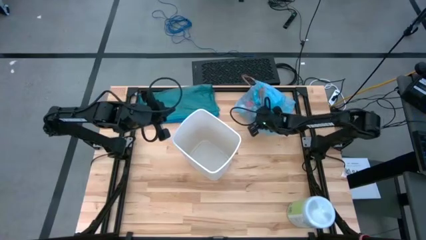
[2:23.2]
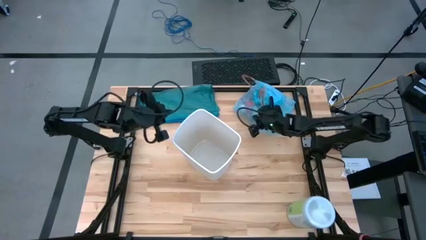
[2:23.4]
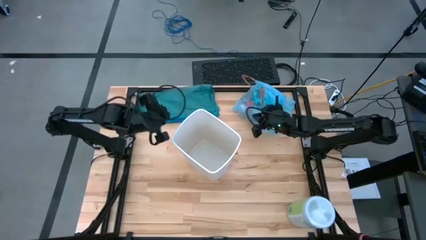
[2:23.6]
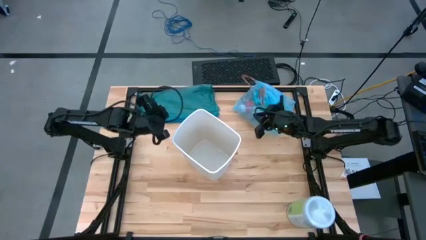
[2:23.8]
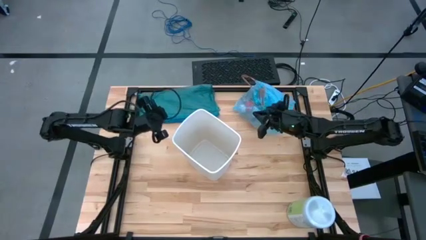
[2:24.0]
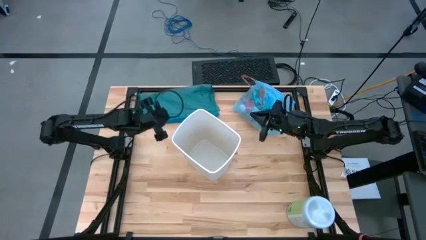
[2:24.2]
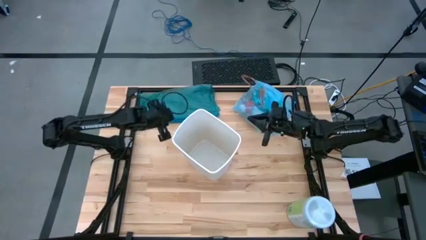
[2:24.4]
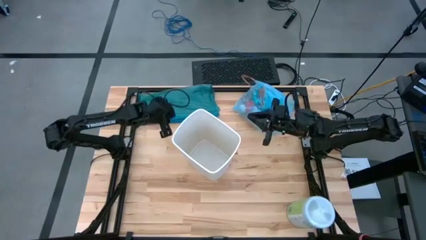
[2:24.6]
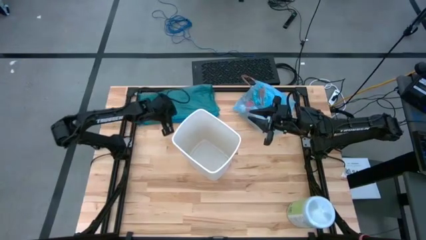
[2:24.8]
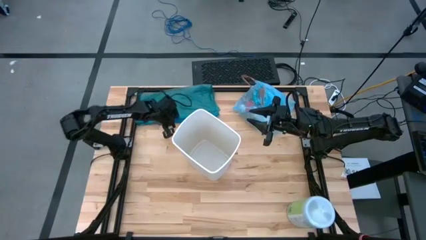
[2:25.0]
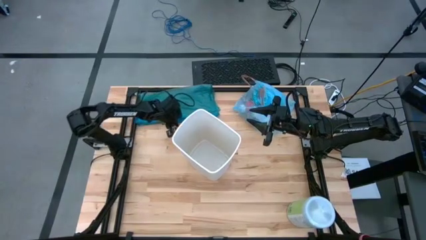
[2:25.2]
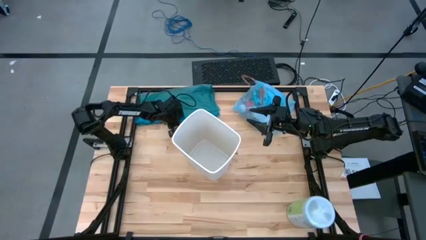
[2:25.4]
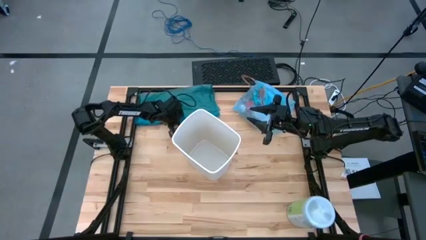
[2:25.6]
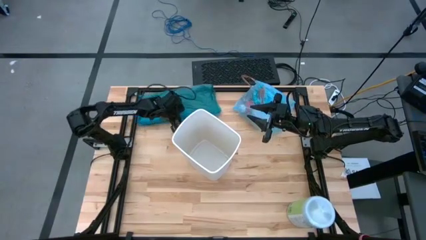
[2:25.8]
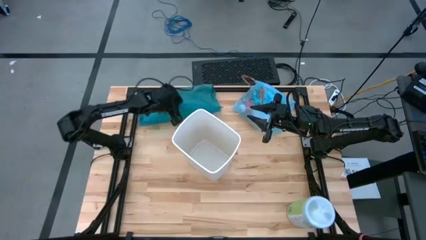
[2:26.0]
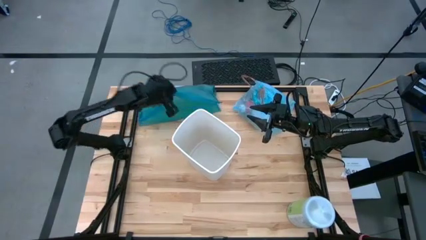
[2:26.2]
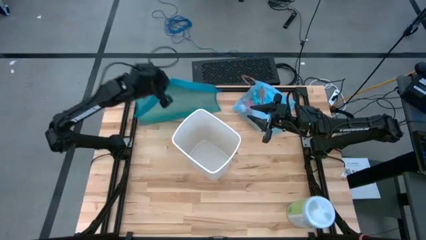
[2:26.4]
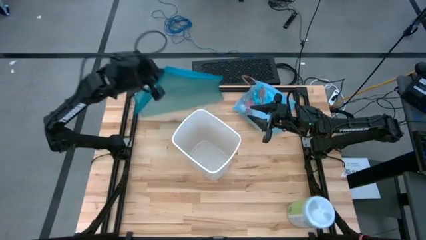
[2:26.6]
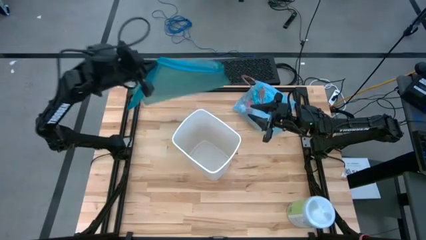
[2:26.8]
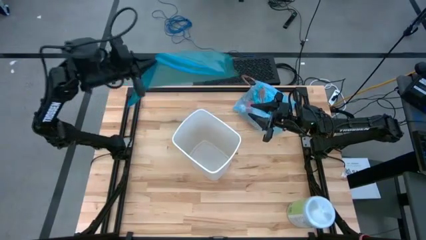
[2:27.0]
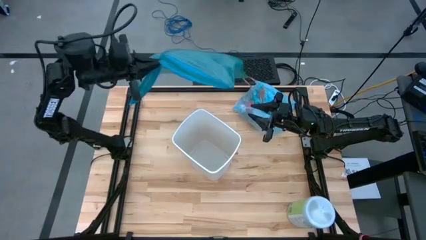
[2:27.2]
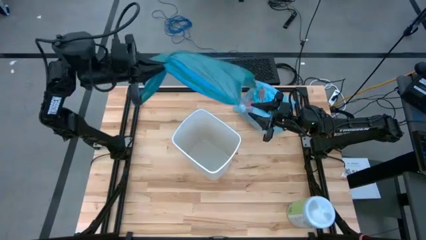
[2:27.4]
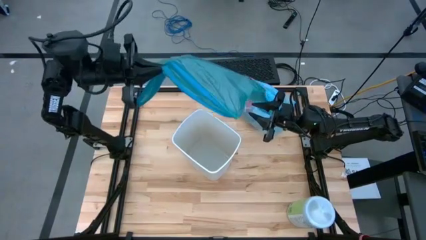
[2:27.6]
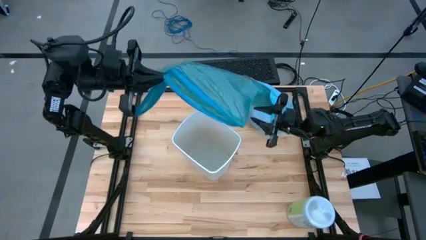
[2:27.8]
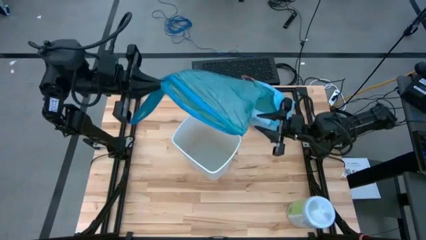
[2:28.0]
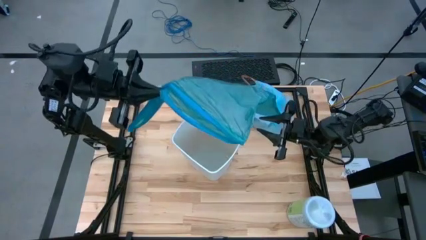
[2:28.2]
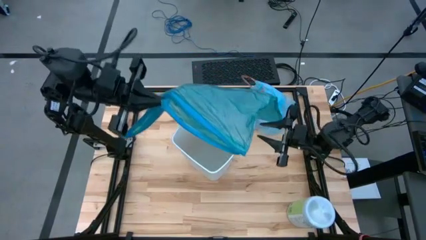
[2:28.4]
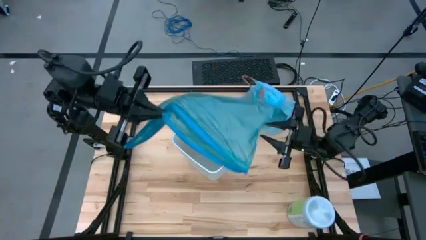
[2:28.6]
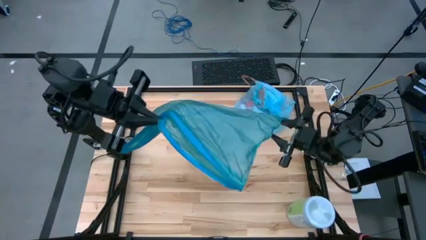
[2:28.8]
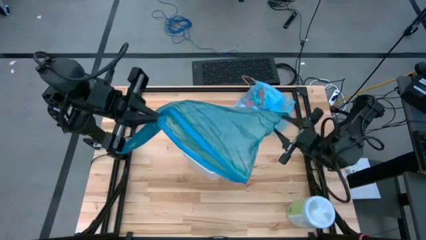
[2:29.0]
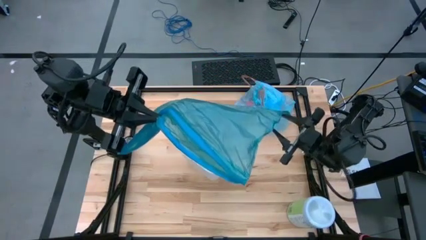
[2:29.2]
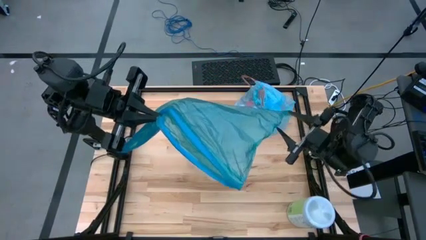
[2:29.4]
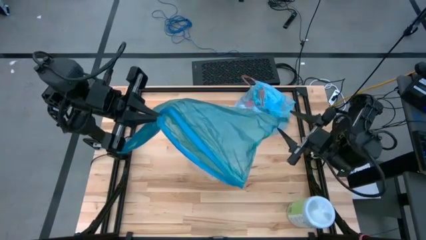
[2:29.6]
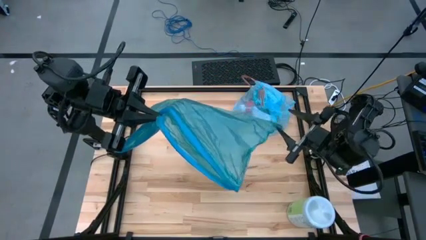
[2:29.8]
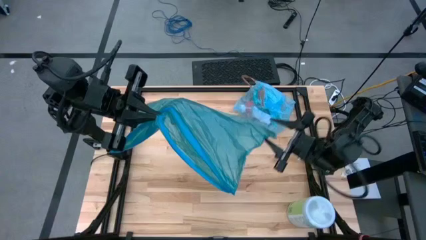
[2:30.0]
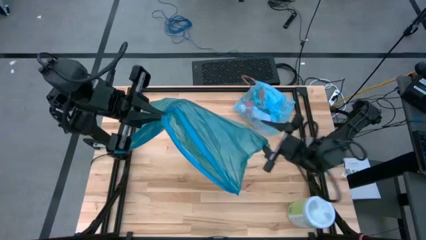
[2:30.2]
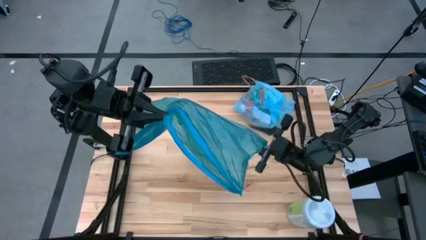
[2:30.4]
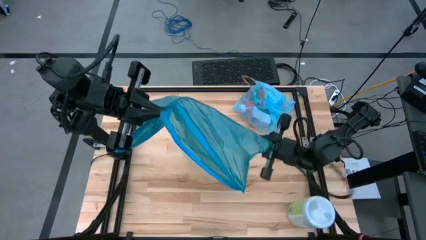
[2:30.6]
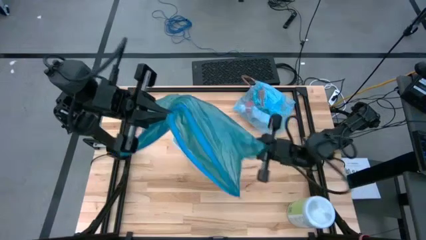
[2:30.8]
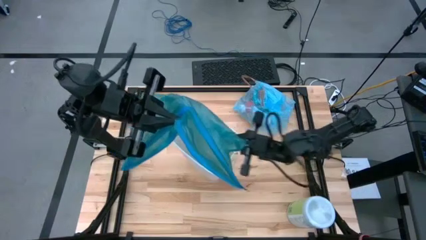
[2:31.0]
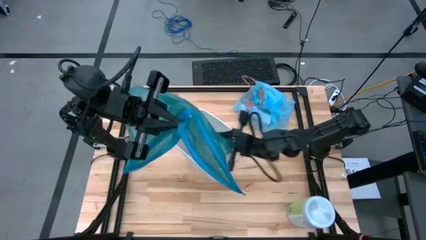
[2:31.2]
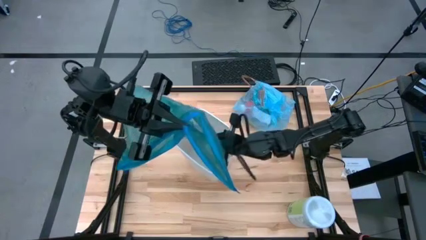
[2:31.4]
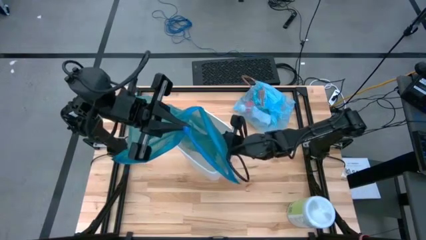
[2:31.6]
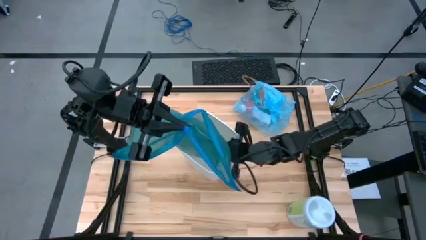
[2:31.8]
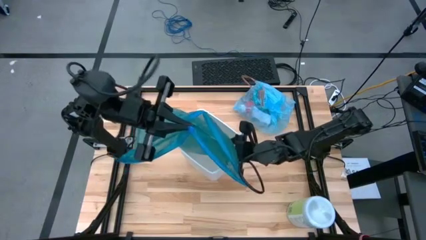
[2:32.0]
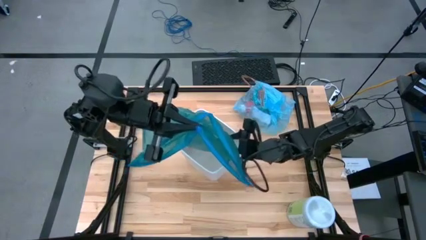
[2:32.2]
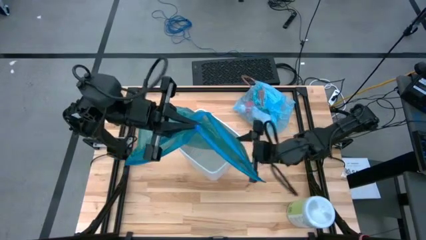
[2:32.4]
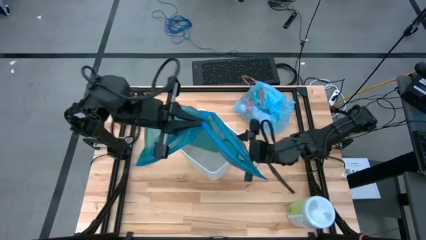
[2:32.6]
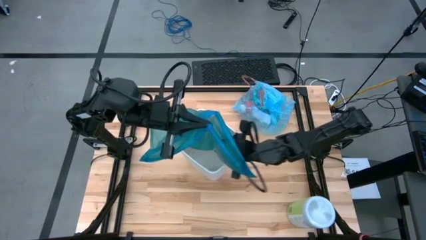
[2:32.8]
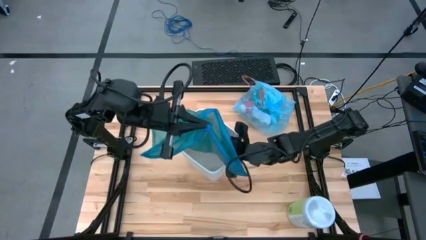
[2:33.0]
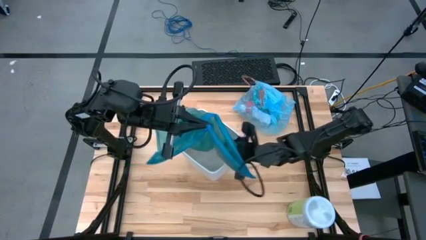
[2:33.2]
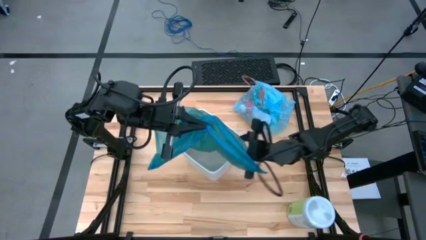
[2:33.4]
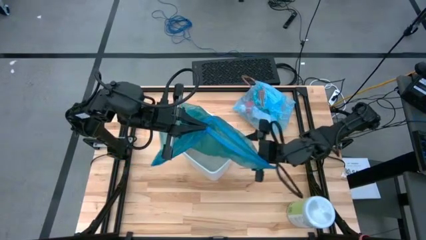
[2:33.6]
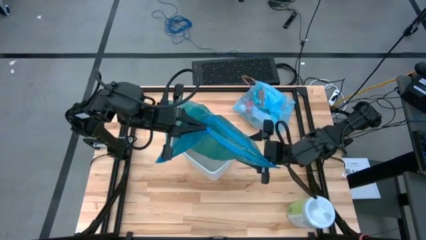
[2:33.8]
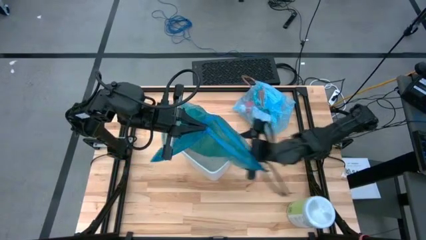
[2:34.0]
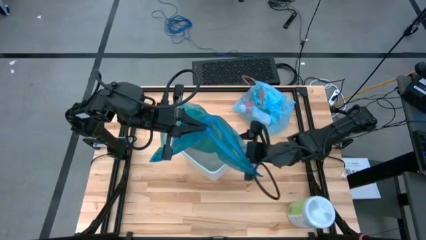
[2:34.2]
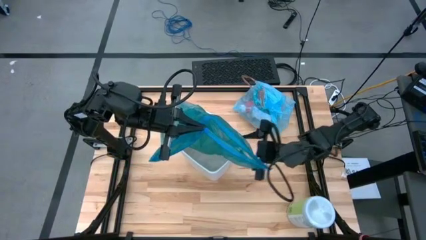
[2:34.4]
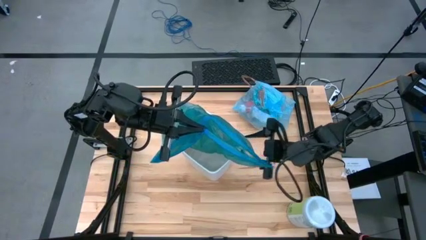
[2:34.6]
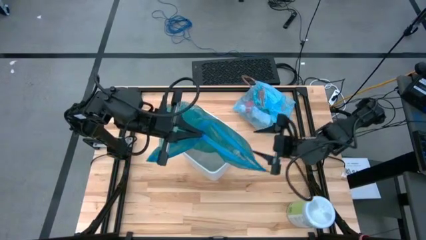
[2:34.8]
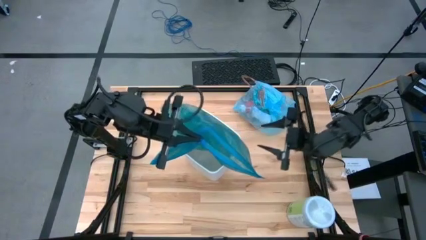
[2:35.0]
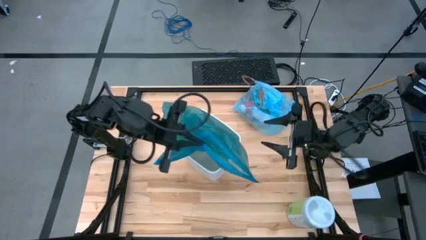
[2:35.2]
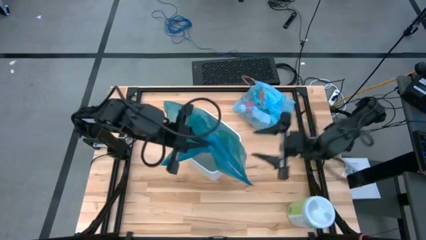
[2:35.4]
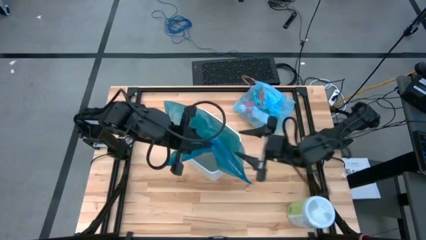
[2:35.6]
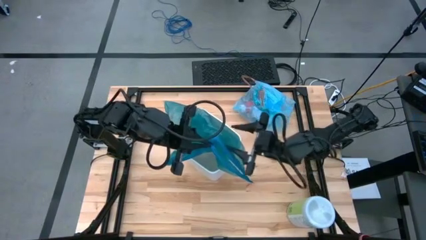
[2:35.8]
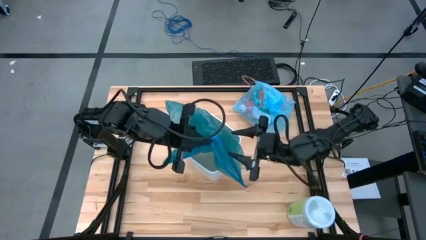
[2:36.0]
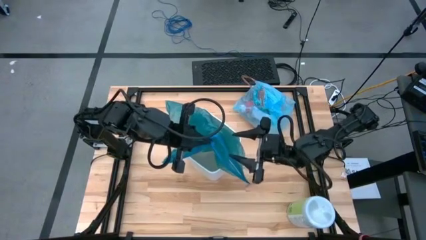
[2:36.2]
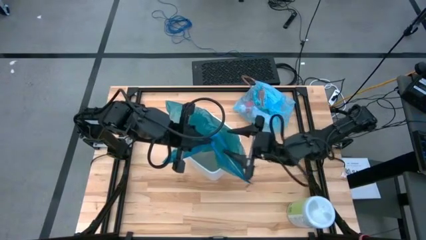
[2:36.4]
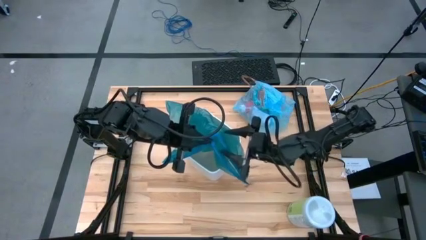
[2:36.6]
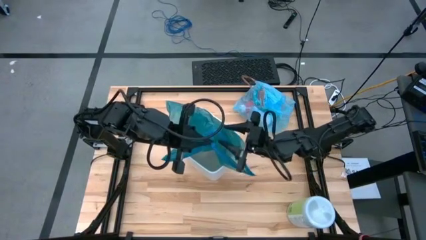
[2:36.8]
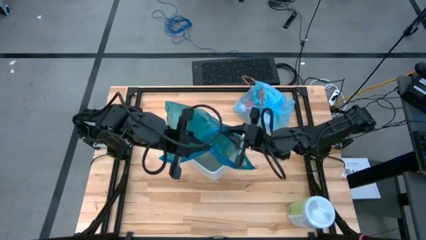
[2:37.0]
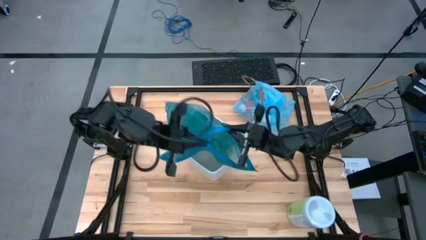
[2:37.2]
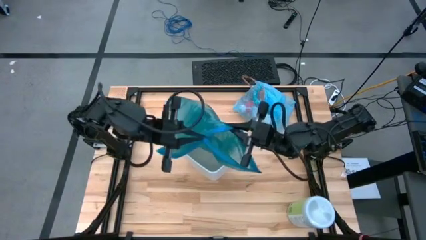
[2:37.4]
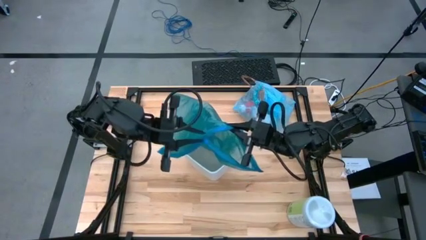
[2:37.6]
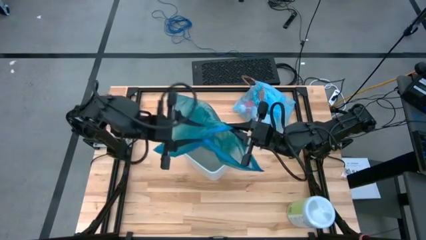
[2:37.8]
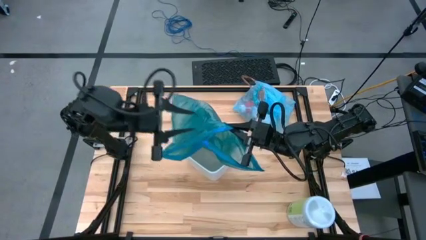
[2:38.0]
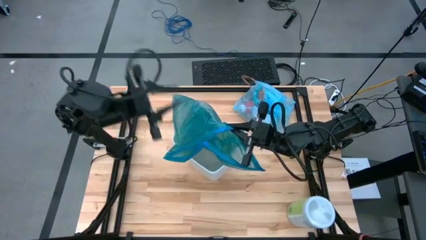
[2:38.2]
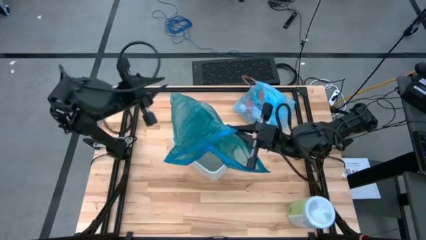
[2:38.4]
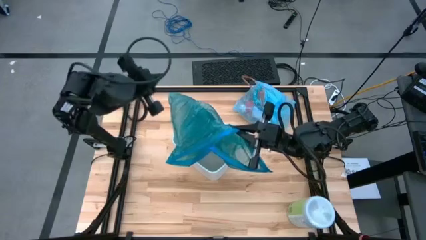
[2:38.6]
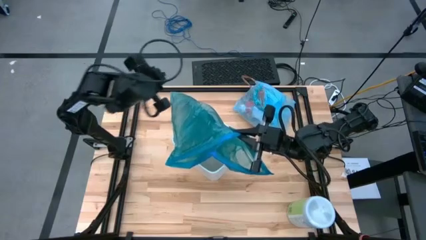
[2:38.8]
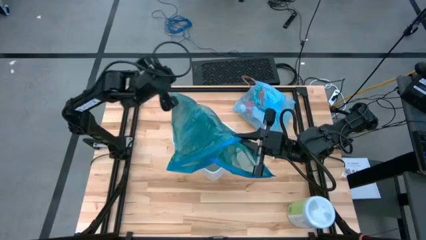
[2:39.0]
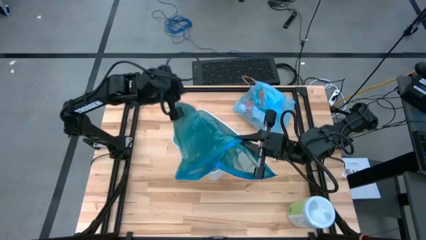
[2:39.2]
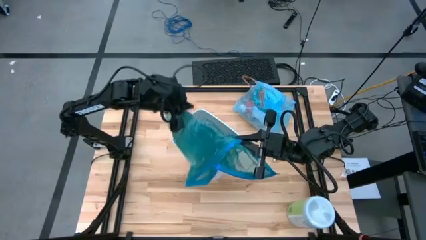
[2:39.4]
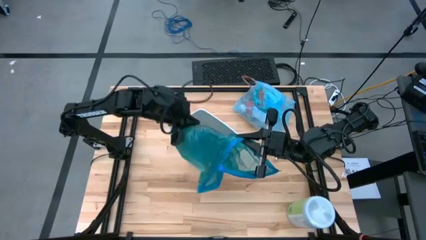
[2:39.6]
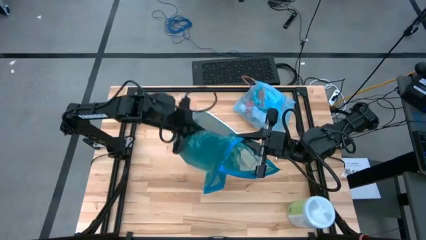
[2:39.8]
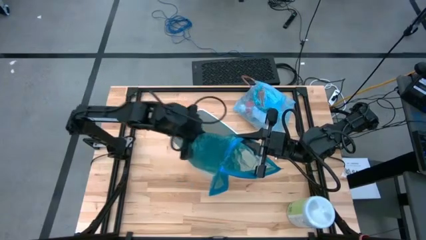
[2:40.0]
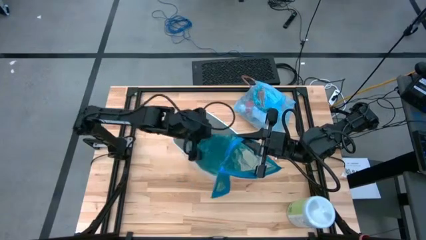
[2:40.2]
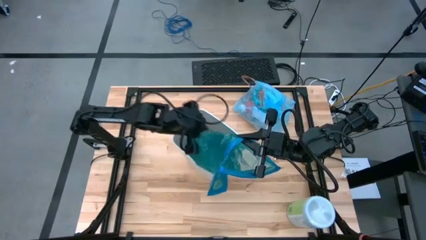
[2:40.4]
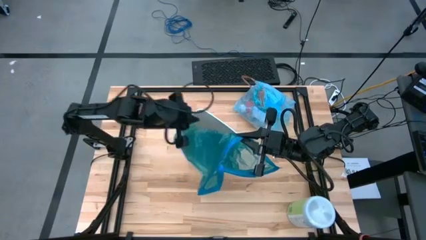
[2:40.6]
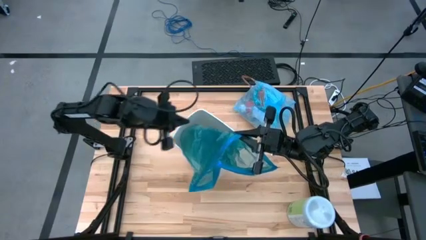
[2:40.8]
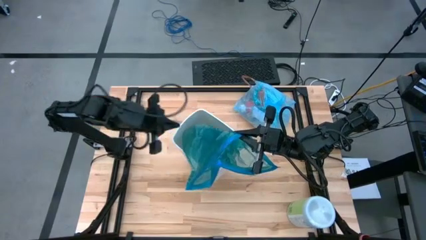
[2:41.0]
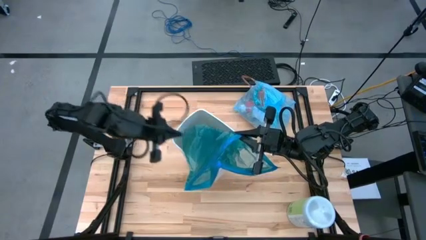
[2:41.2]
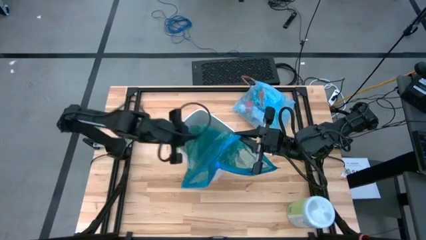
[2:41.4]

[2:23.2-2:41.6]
Task: place trash/remove bag and relplace
Insert a blue trash bag into the trash bin
